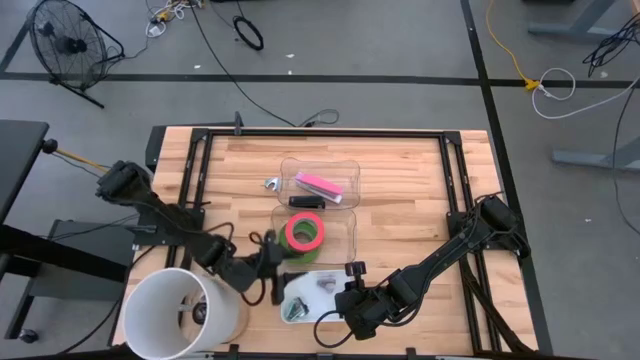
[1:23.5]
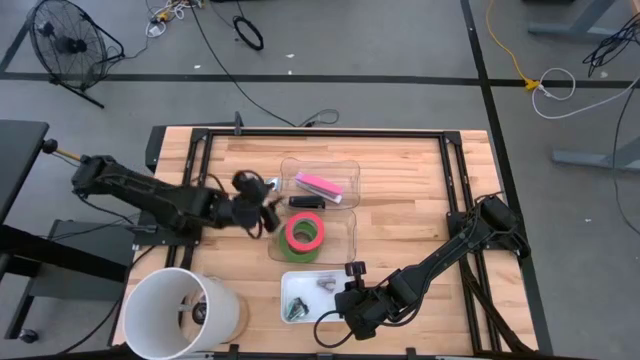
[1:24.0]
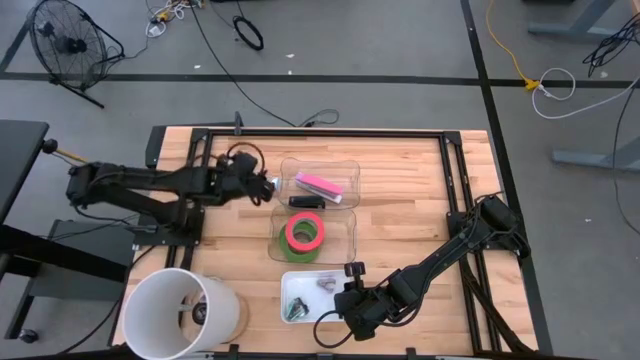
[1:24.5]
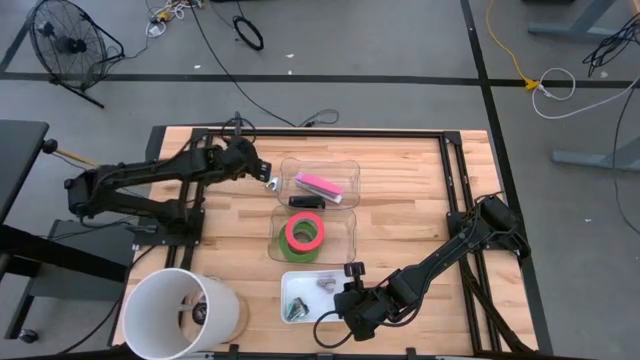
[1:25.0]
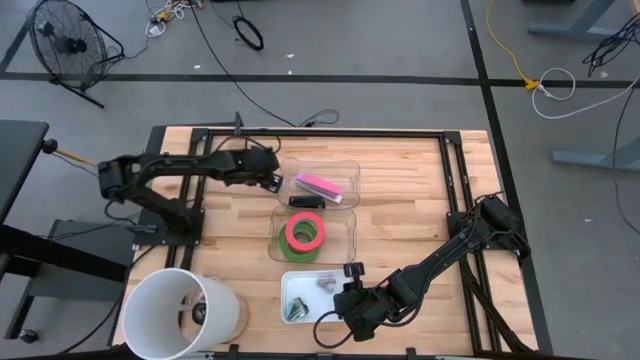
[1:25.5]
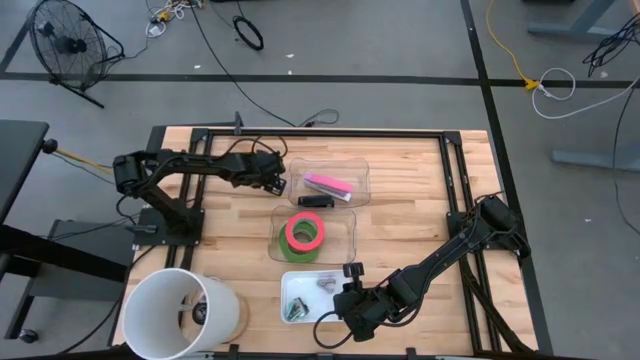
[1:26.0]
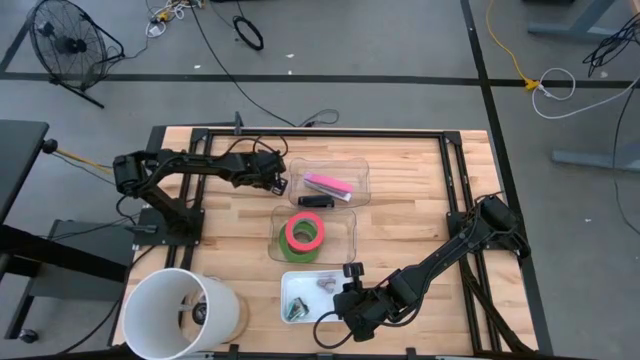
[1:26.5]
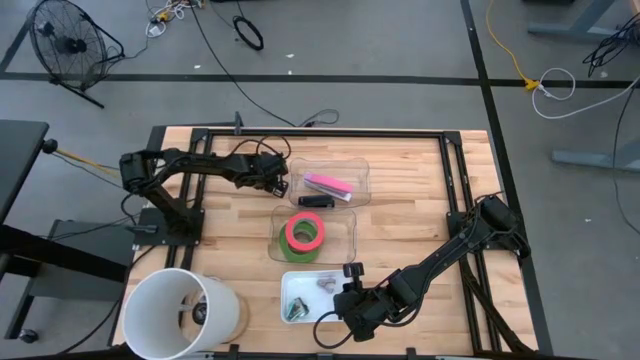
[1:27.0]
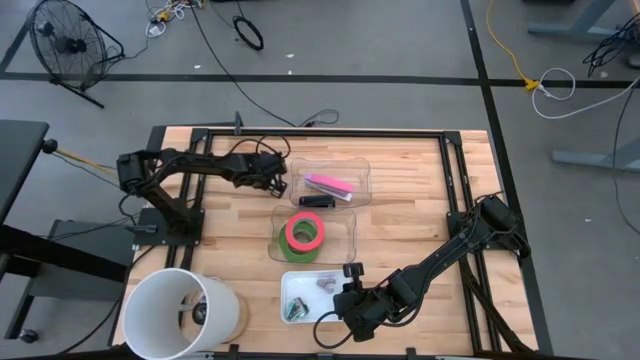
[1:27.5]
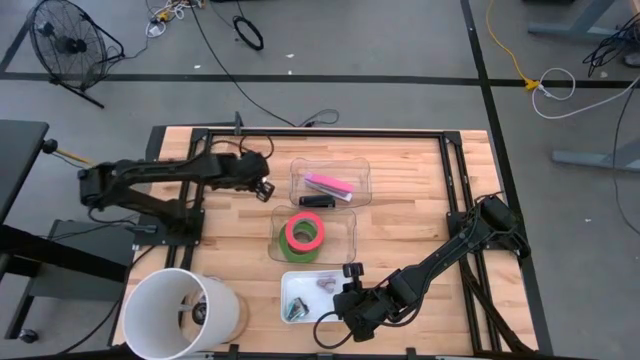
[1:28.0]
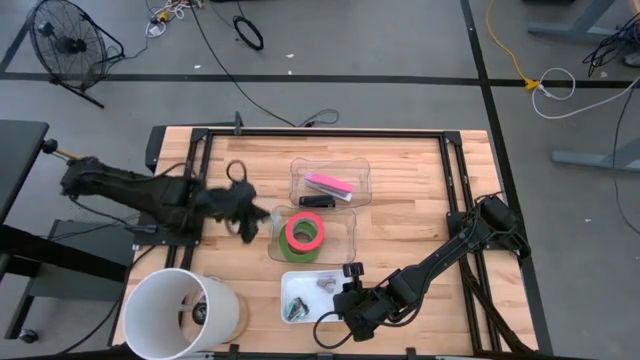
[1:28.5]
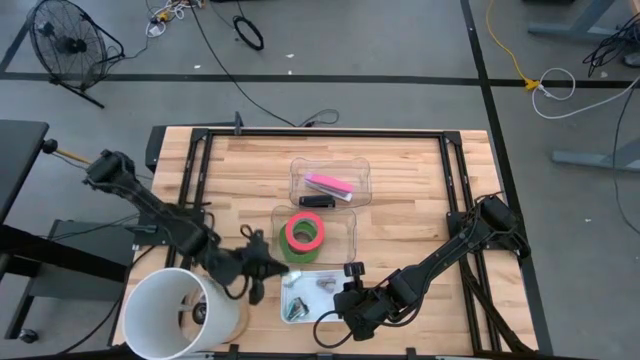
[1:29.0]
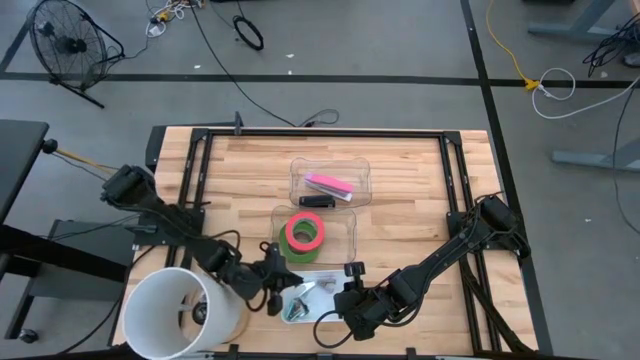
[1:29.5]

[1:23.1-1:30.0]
Task: Pick and place Stapler, Stapler remover, tape
Put the blue staple remover into the white bin

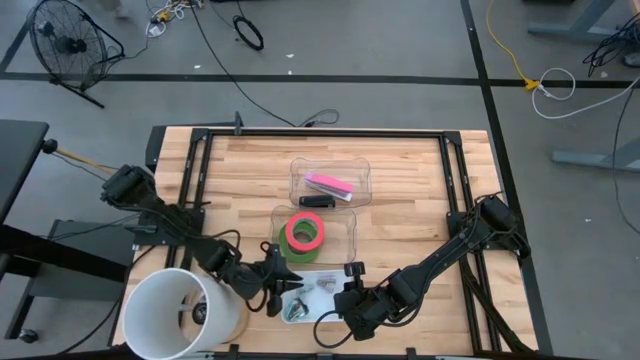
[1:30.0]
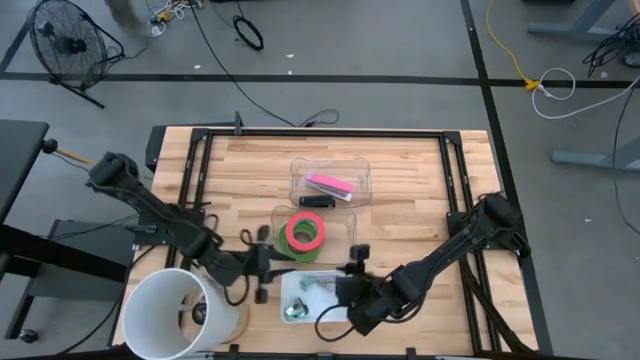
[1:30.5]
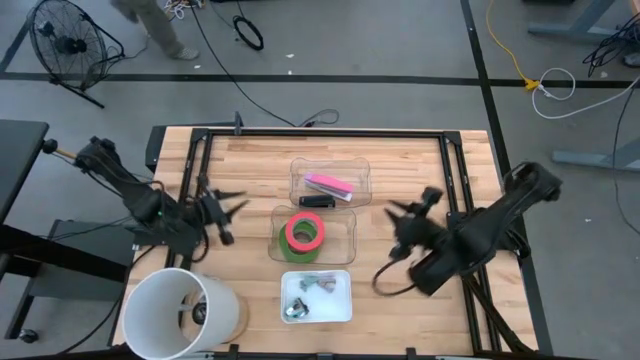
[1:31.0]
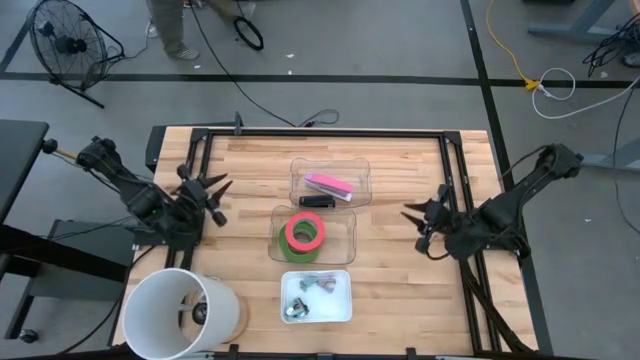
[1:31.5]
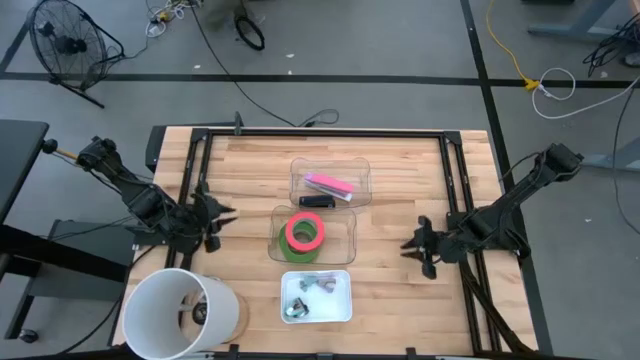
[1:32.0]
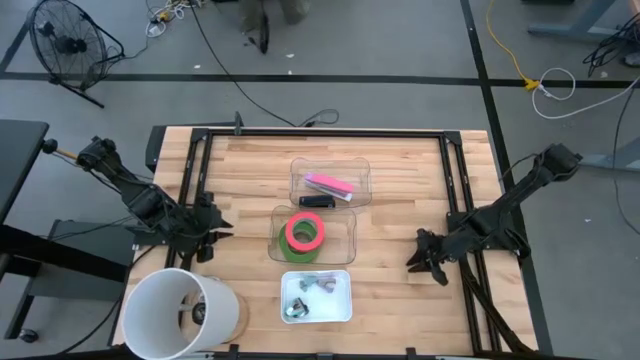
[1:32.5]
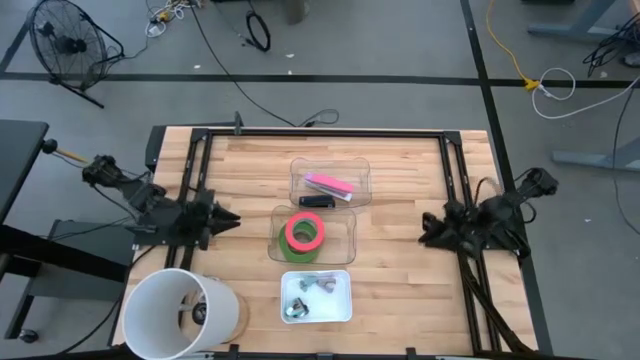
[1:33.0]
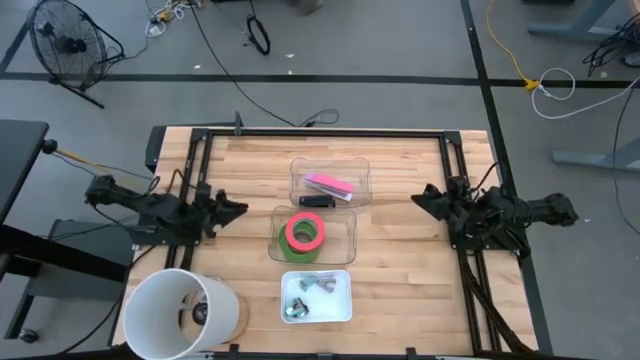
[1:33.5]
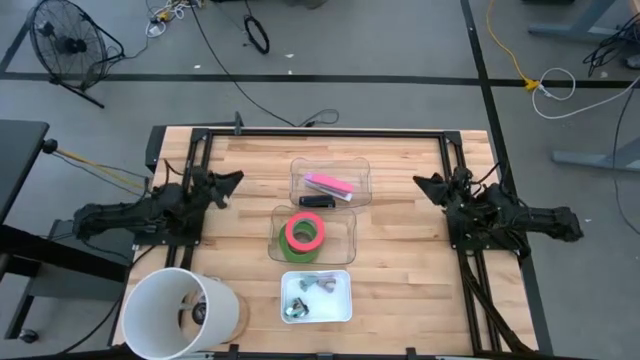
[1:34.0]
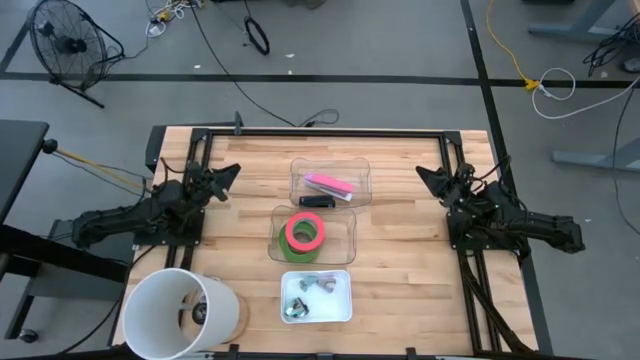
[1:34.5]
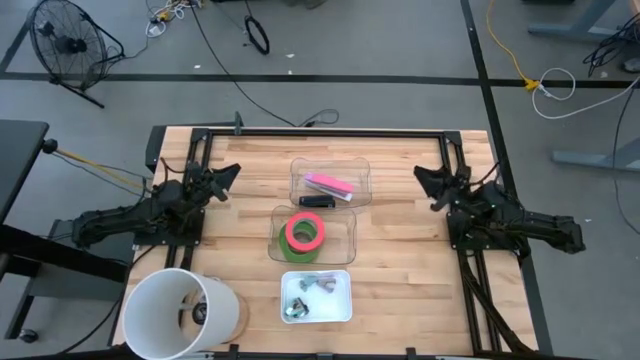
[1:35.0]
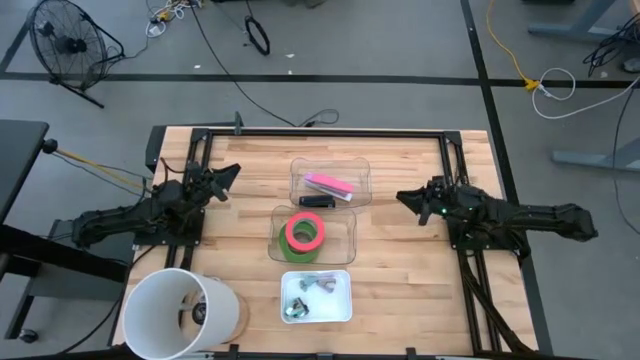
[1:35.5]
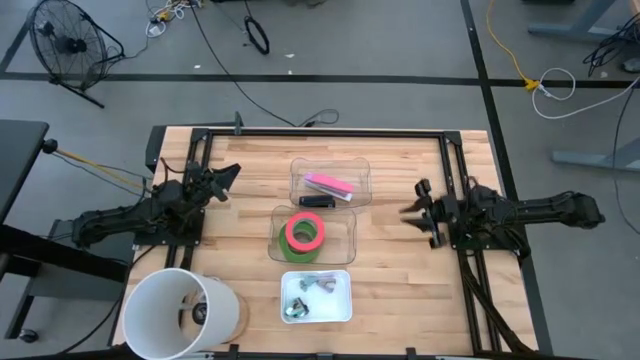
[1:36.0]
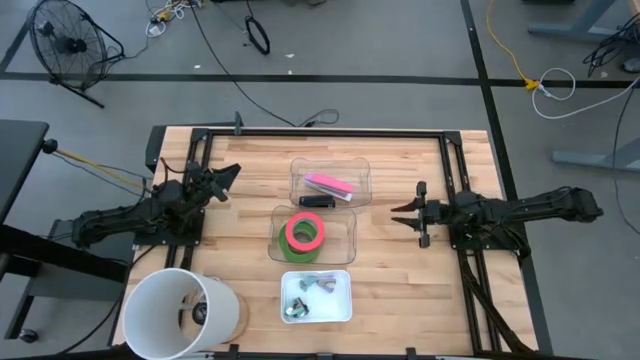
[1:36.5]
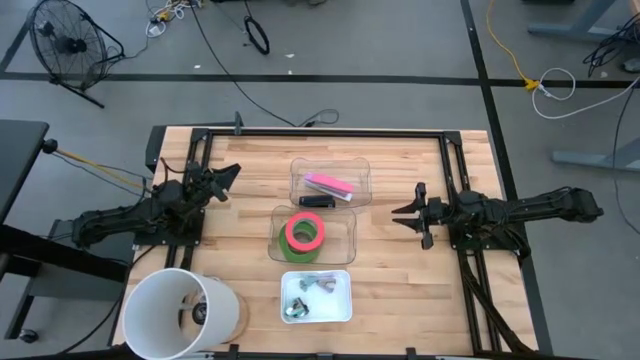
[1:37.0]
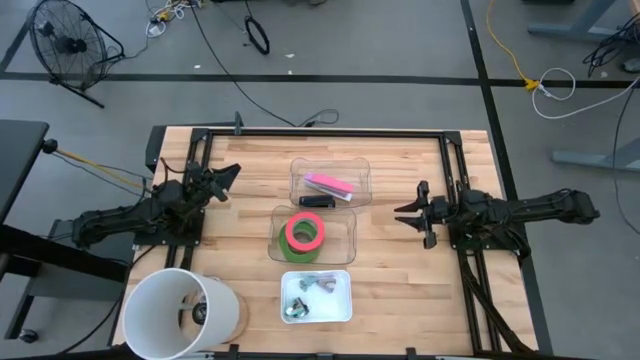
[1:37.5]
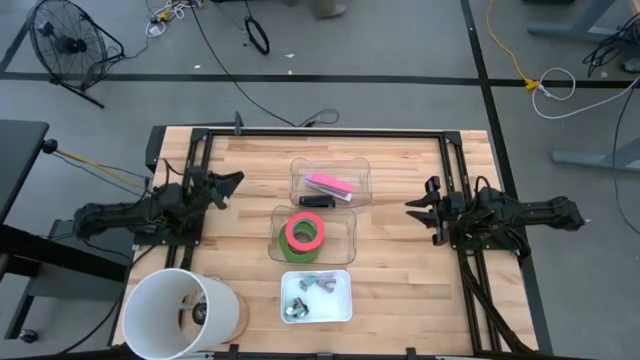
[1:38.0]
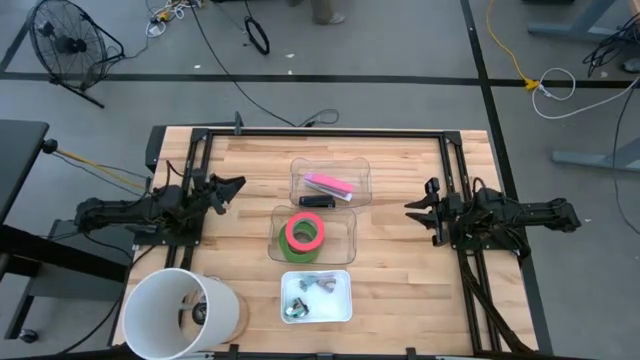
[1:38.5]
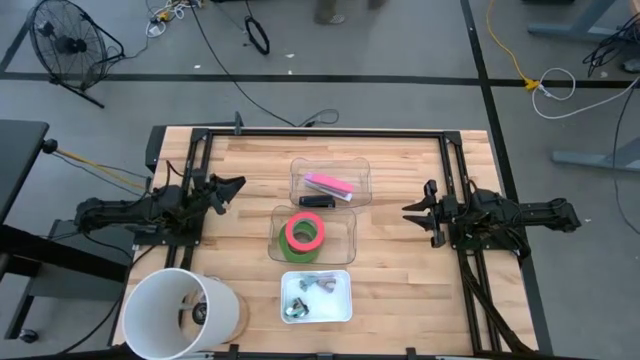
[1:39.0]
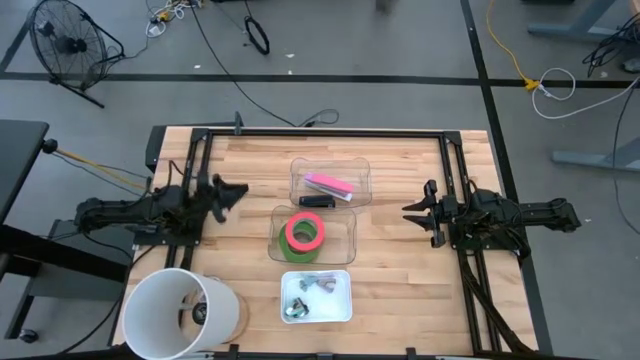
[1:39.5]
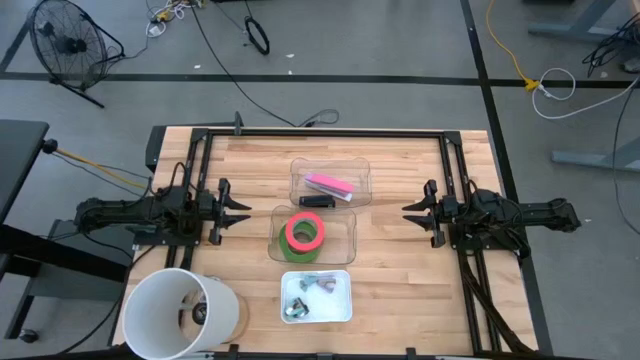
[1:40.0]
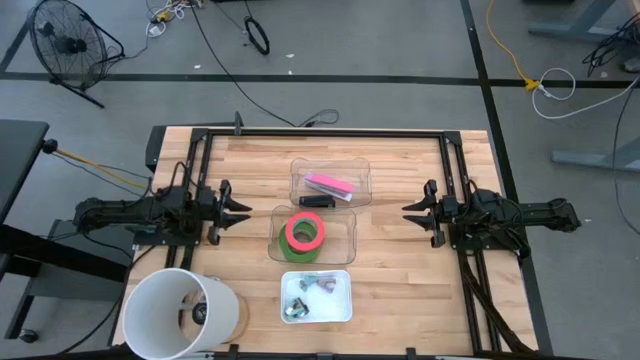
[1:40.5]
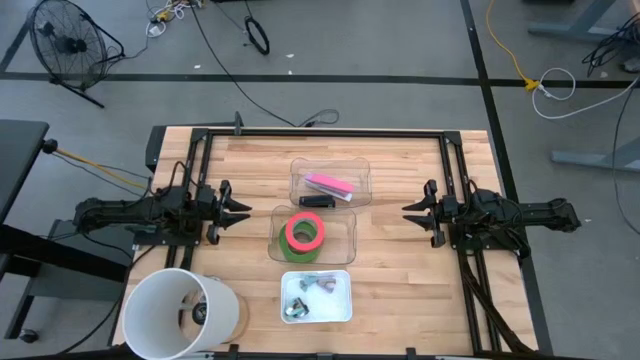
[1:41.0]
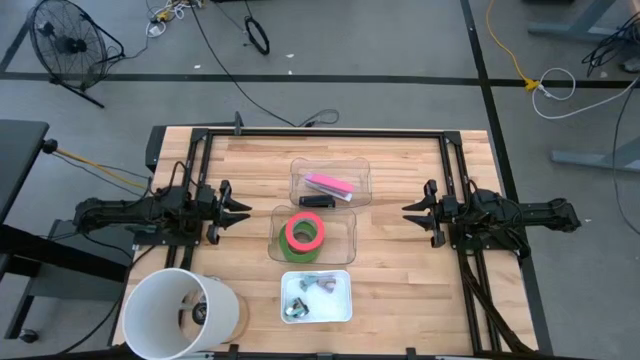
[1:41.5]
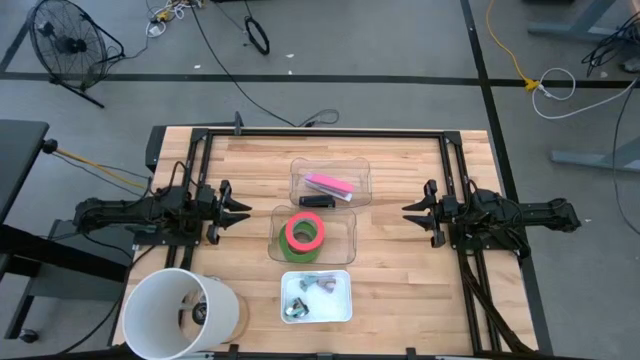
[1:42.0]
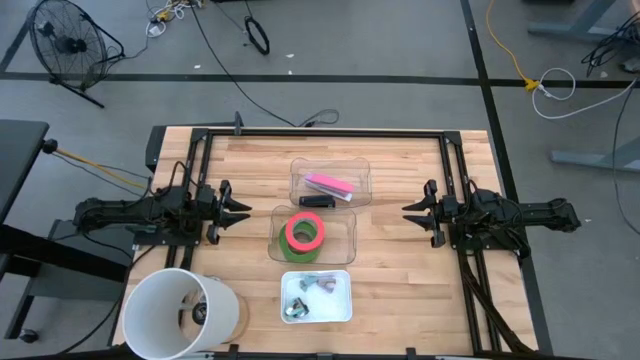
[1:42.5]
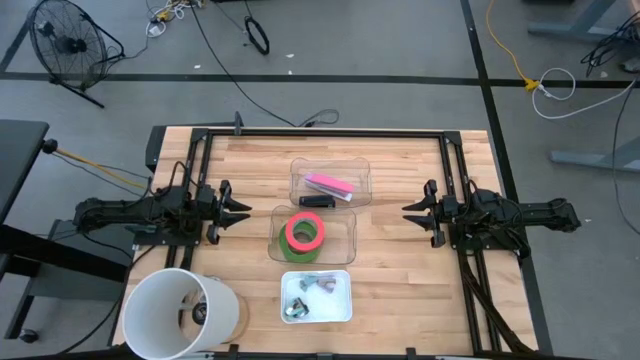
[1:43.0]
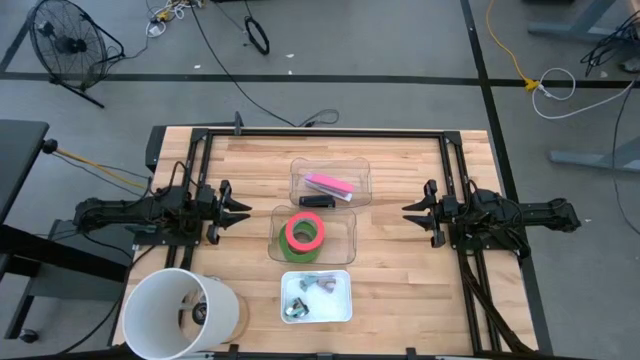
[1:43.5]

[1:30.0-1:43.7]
Return to Home Position
